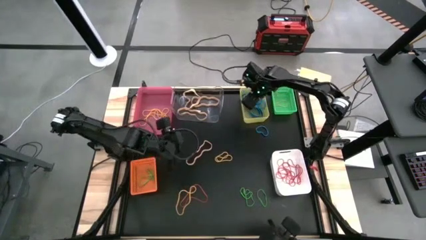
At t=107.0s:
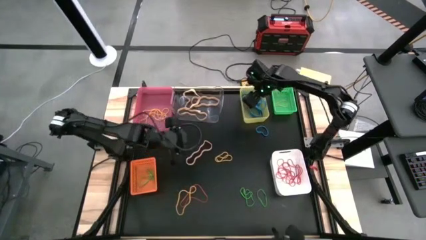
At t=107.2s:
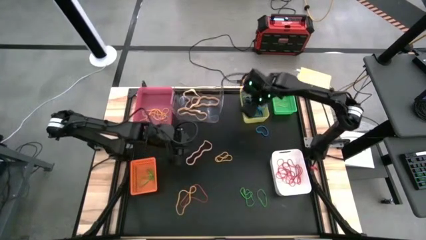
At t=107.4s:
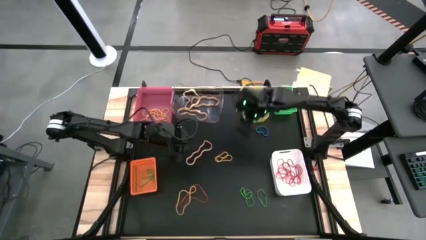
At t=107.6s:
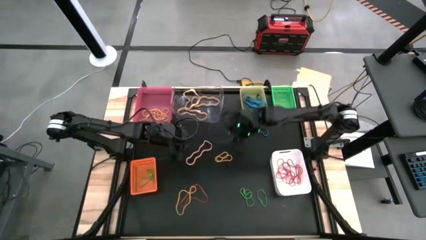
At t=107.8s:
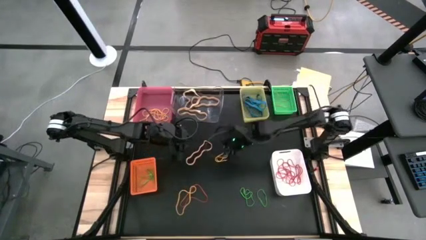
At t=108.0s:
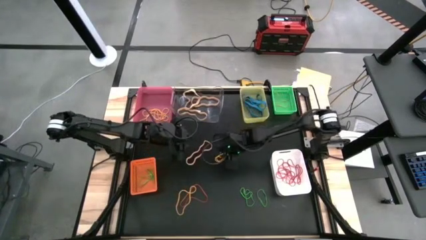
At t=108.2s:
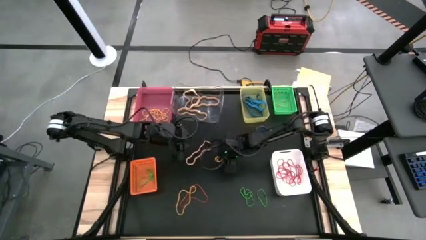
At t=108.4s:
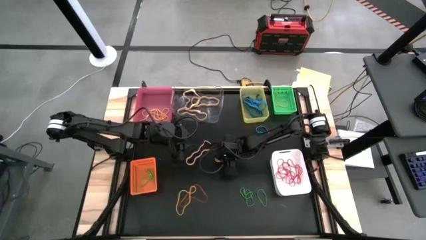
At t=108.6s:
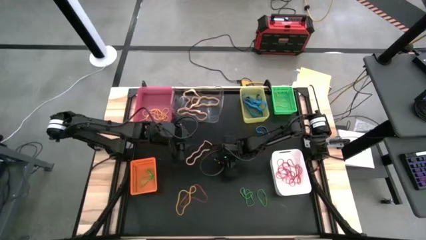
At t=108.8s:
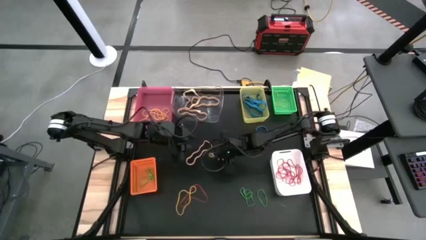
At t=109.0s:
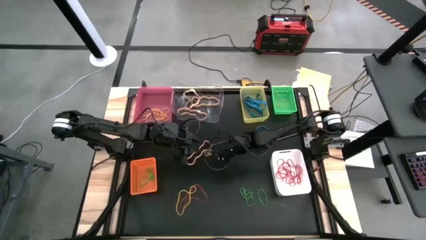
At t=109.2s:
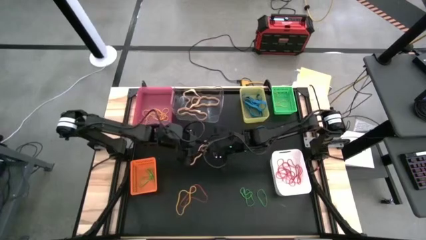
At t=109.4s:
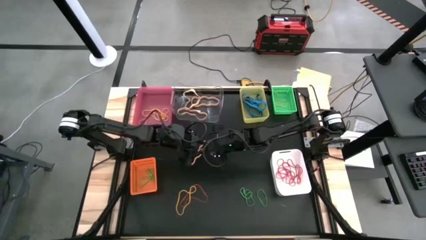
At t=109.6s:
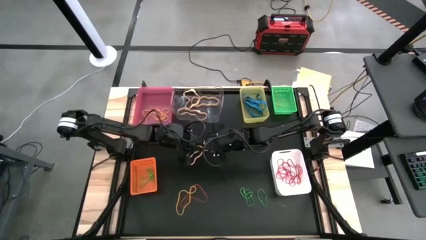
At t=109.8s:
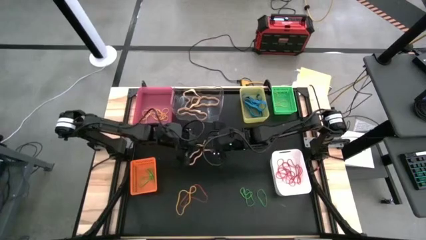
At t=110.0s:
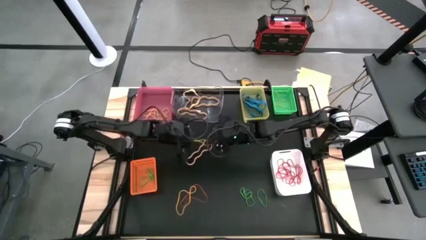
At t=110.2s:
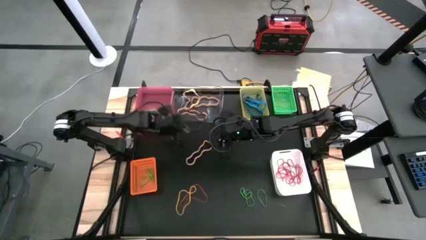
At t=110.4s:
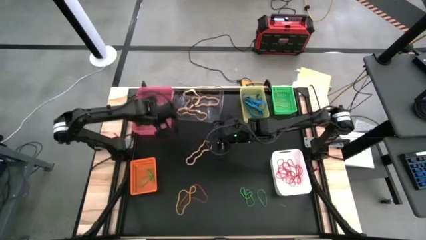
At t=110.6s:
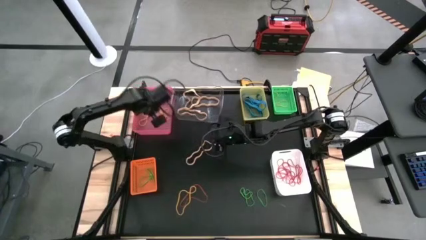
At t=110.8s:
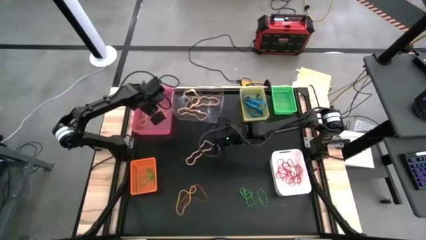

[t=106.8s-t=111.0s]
Task: Sort rubber bands into baskets
Put the yellow rubber band into the pink bin

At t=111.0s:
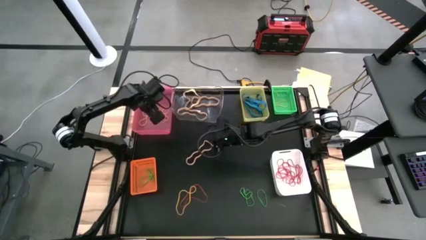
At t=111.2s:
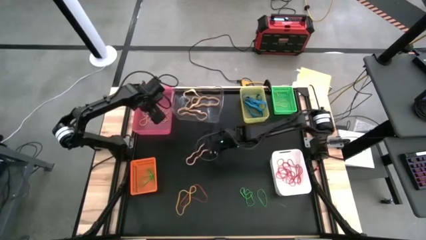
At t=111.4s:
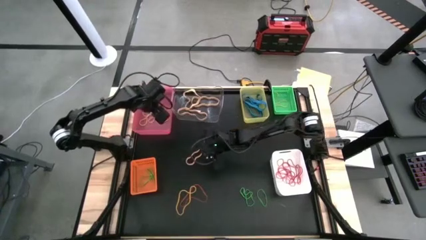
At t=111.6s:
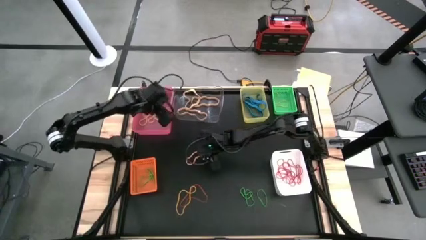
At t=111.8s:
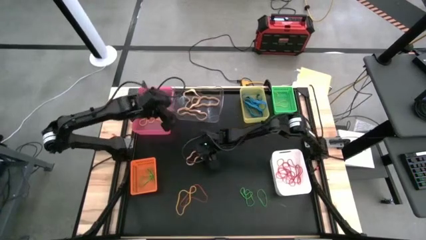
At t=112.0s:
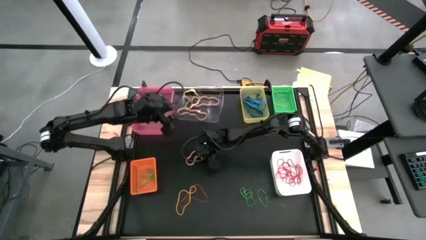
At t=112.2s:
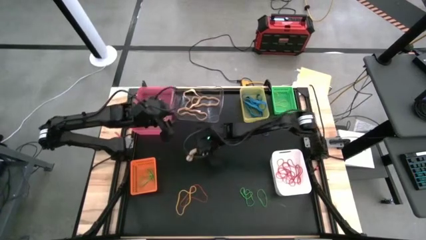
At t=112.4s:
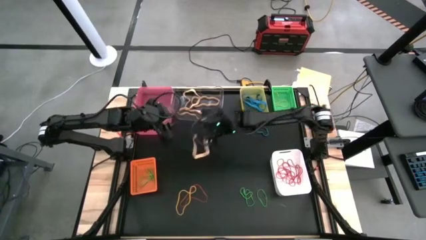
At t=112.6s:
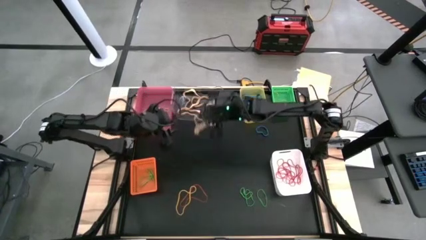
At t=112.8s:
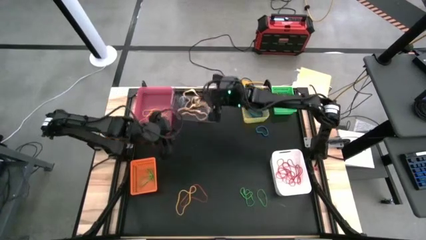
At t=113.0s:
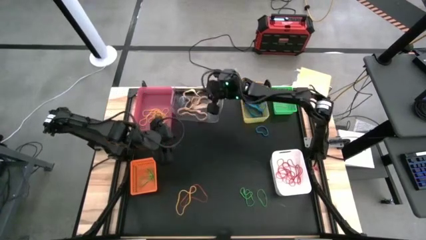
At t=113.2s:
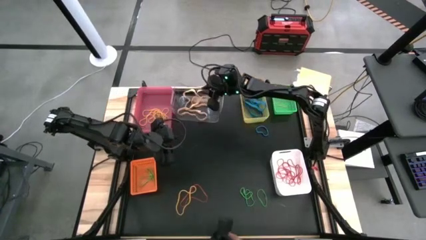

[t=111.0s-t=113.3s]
Put the brown rubber band into the transparent bin

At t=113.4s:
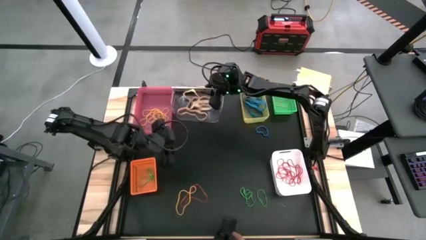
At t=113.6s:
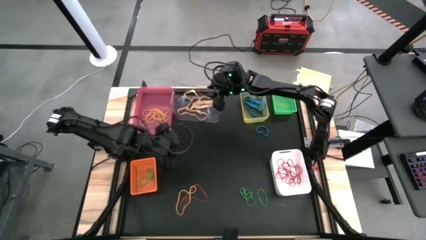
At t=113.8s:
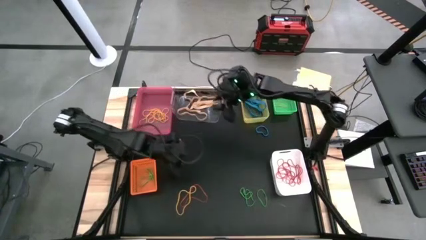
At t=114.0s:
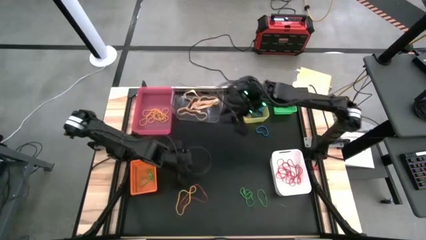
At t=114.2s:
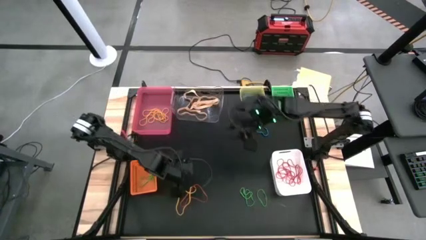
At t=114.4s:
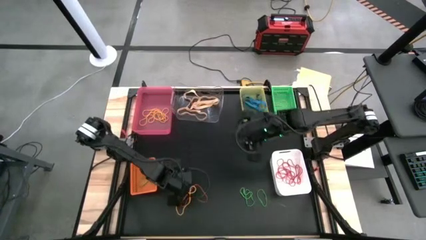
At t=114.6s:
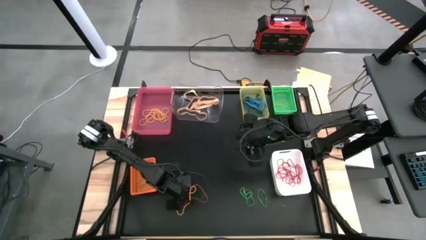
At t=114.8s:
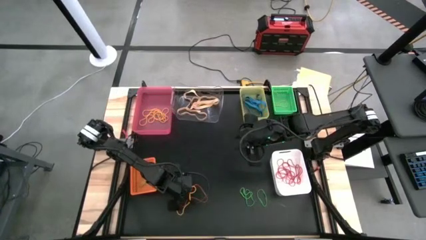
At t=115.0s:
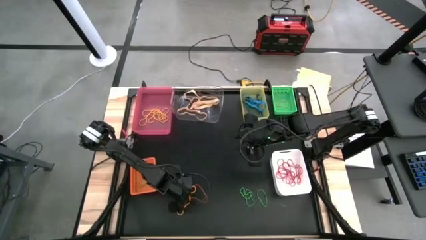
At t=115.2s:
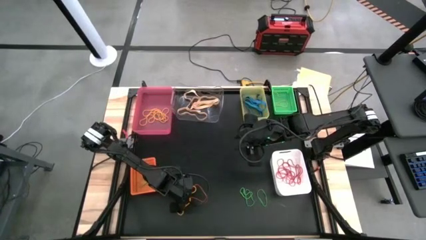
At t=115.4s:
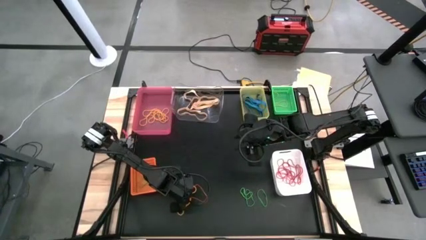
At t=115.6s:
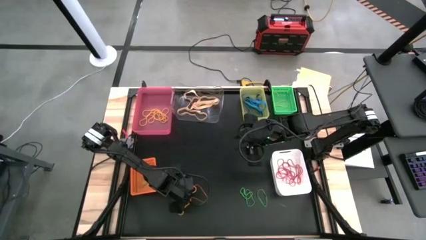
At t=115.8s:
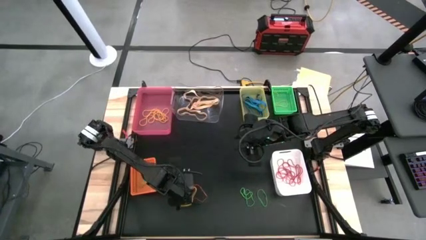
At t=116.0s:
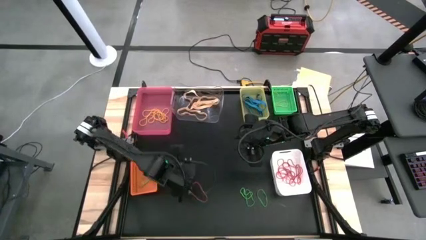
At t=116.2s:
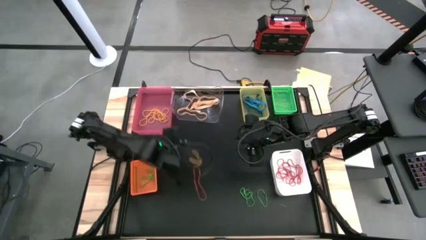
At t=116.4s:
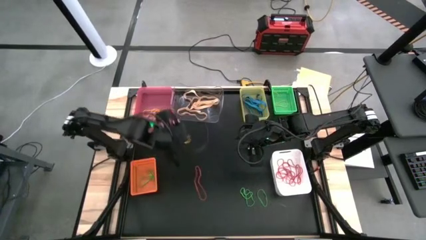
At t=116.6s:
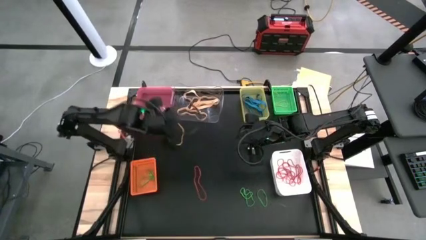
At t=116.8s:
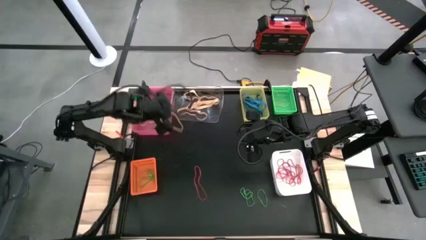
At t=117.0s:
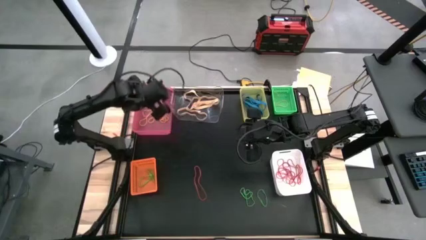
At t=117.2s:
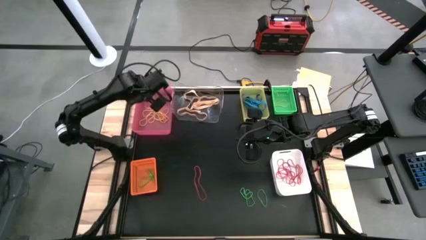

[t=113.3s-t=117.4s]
Put the yellow rubber band into the pink bin

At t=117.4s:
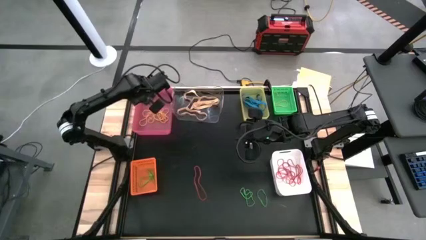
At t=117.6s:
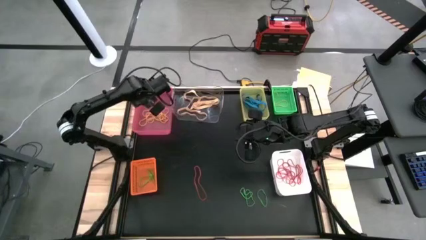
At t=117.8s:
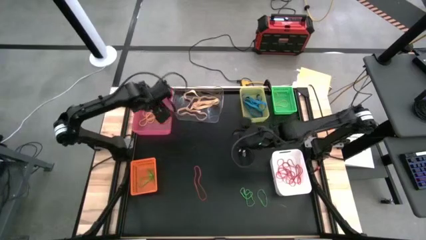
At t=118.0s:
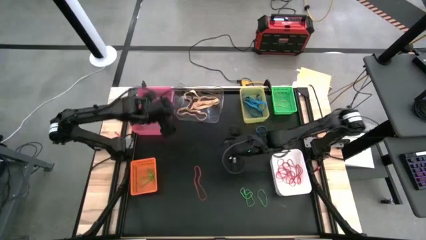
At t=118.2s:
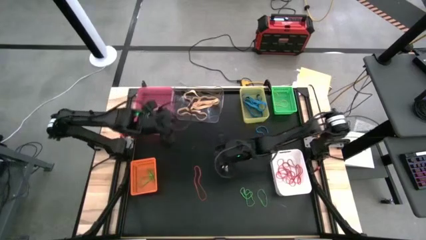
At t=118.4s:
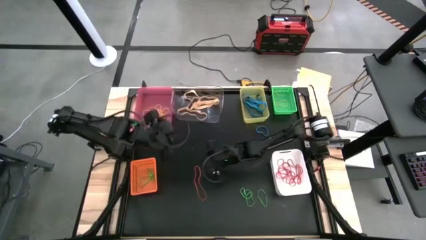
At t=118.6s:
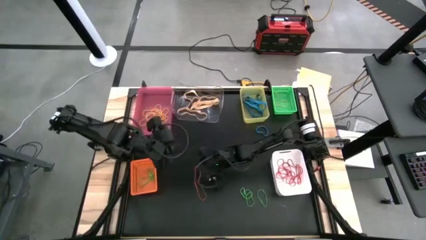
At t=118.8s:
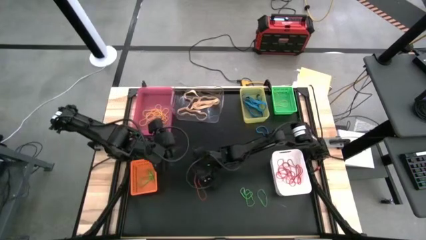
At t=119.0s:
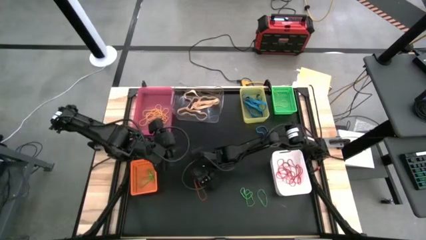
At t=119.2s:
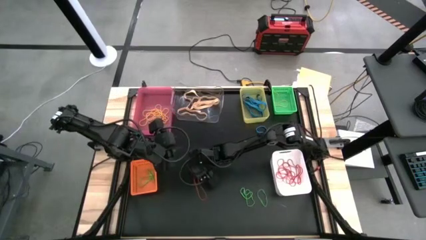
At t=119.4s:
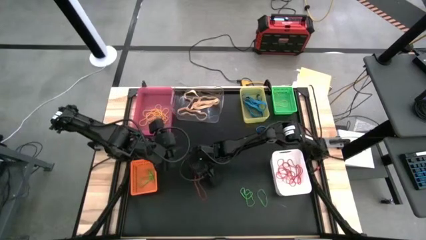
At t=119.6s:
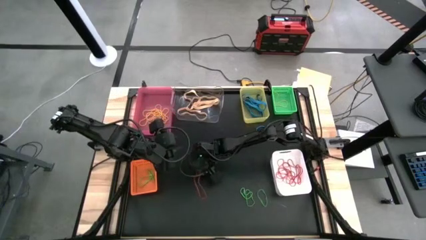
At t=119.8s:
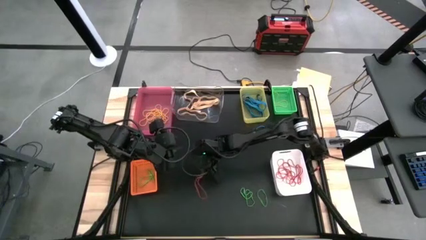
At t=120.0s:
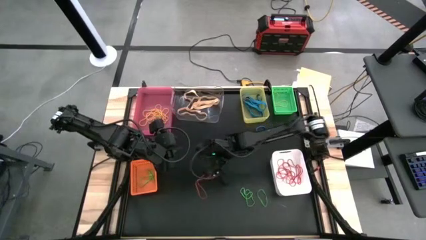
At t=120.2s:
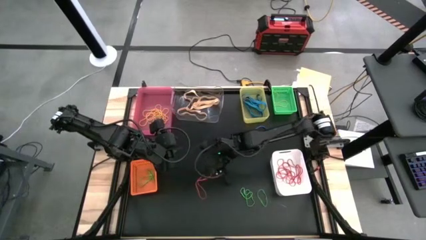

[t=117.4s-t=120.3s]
Put the red rubber band into the white bin

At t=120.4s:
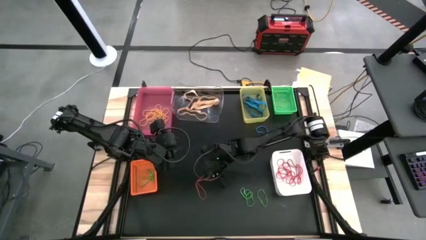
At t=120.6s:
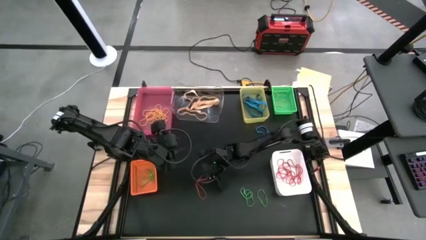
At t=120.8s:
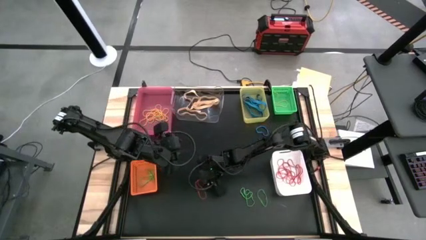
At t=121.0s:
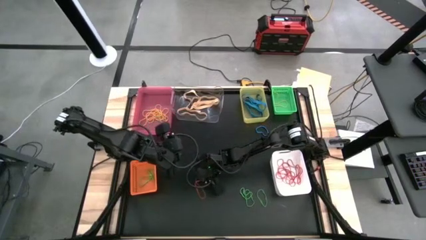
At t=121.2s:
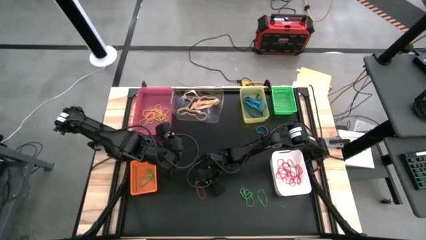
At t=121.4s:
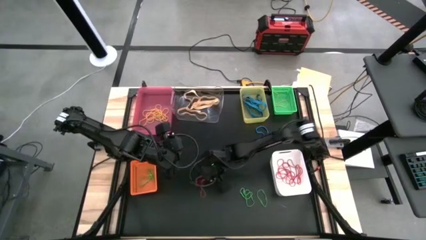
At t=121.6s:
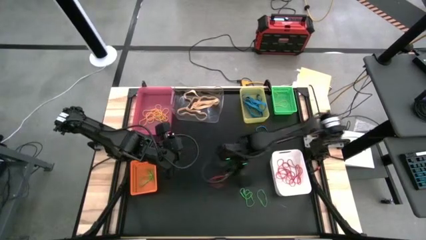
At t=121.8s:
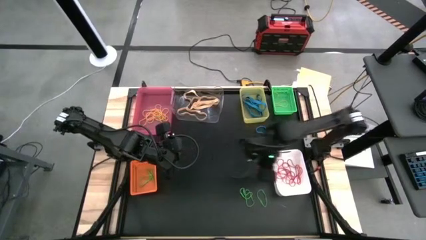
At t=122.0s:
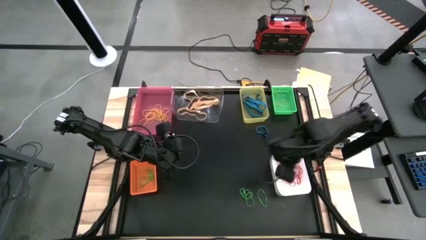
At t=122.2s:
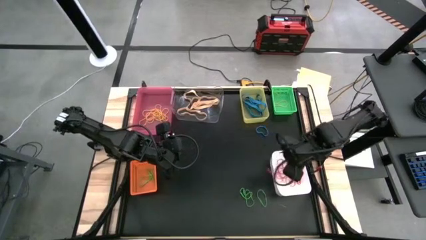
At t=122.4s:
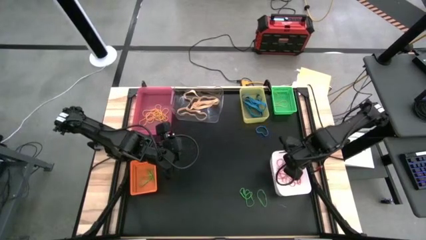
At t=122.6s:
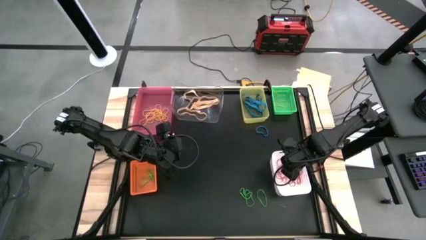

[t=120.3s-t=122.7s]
Put the red rubber band into the white bin

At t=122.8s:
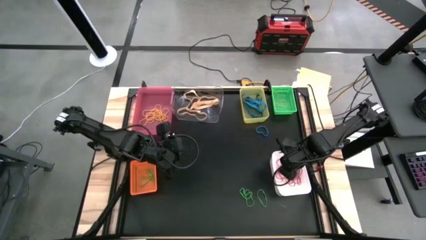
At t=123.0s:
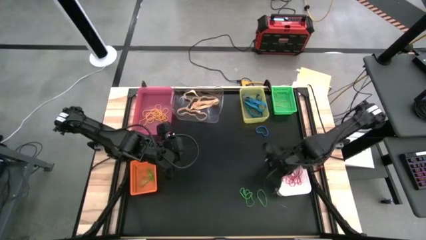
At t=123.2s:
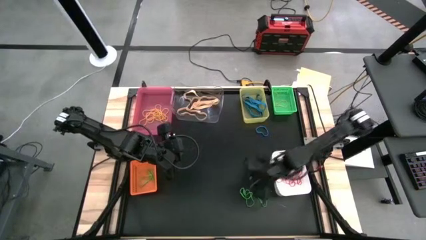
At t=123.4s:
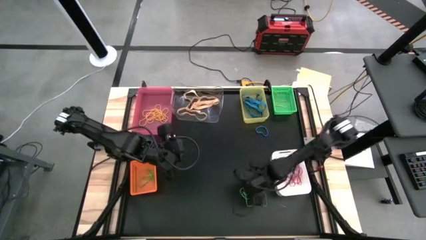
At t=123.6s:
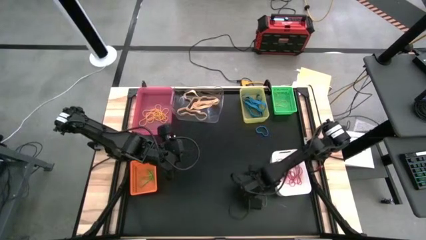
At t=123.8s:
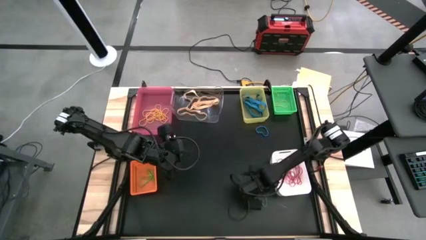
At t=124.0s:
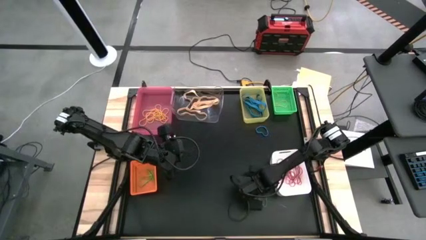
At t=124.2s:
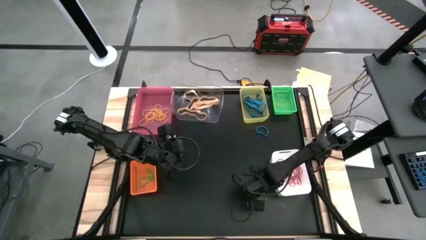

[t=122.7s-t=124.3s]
Put the green rubber band into the orange bin
